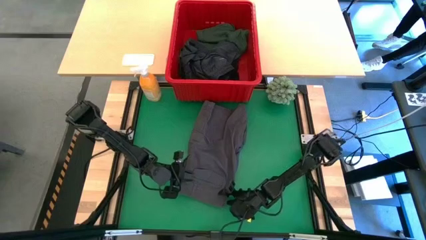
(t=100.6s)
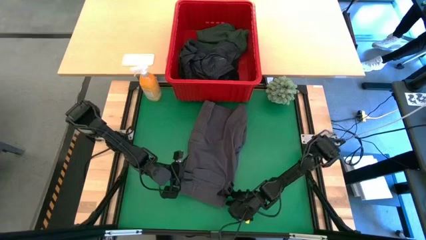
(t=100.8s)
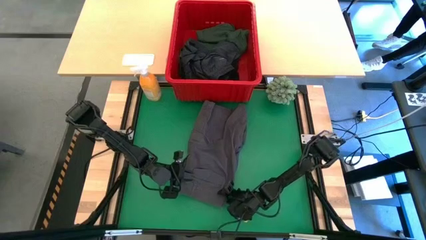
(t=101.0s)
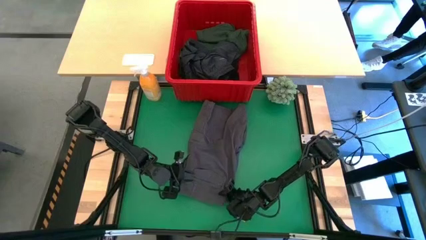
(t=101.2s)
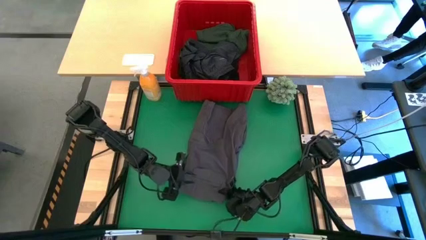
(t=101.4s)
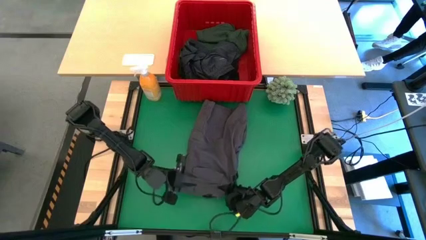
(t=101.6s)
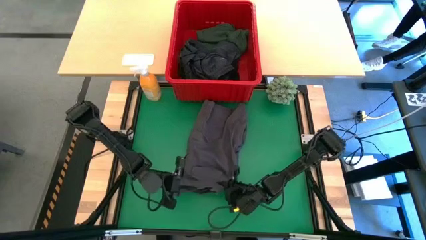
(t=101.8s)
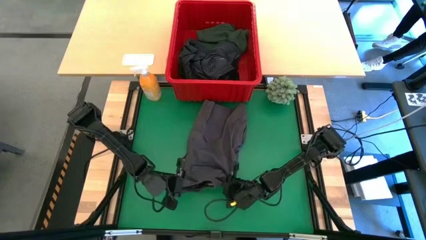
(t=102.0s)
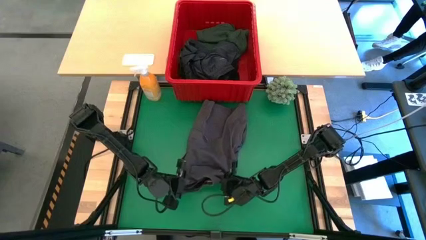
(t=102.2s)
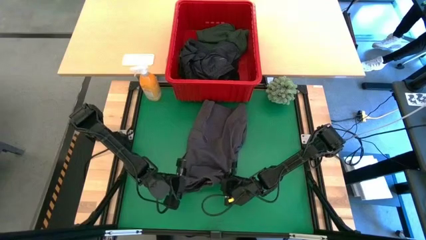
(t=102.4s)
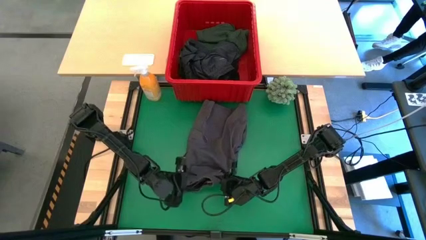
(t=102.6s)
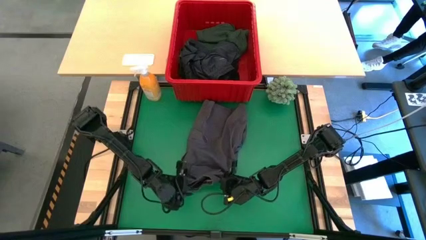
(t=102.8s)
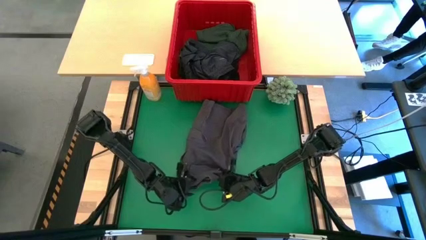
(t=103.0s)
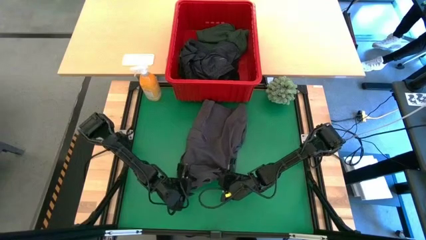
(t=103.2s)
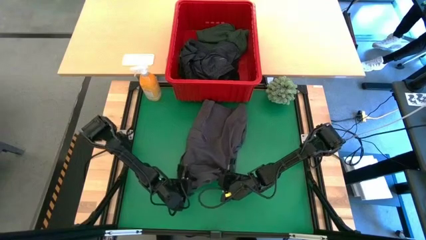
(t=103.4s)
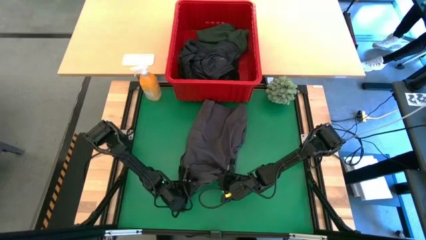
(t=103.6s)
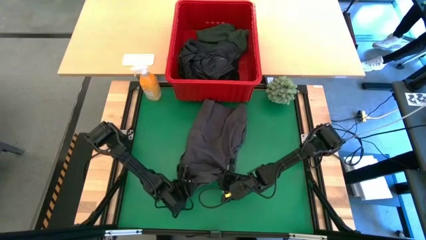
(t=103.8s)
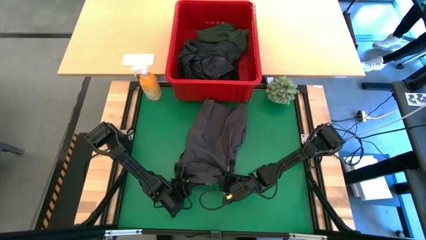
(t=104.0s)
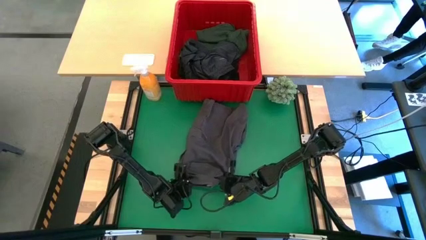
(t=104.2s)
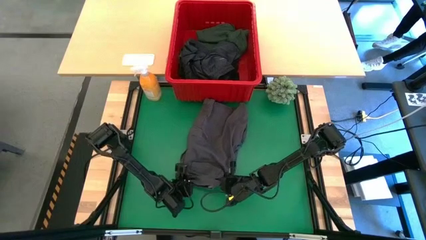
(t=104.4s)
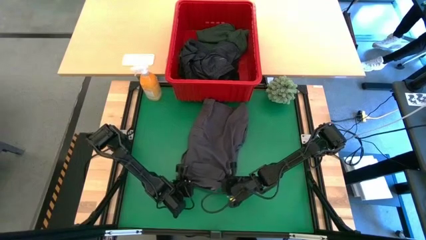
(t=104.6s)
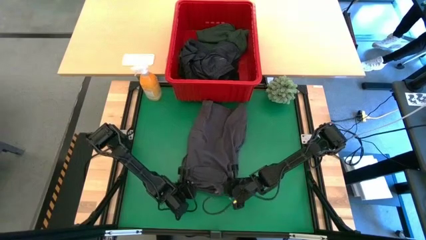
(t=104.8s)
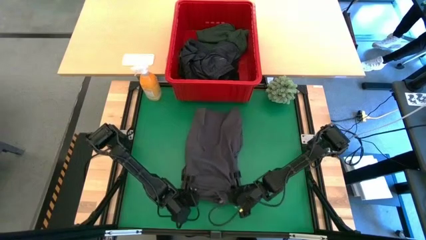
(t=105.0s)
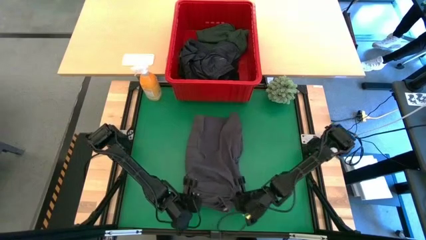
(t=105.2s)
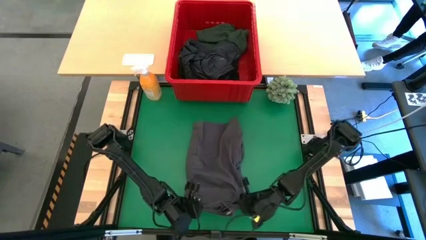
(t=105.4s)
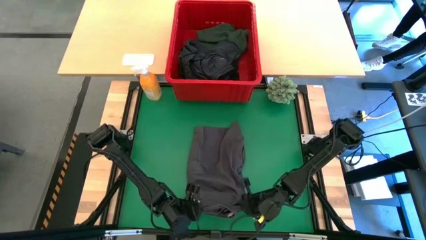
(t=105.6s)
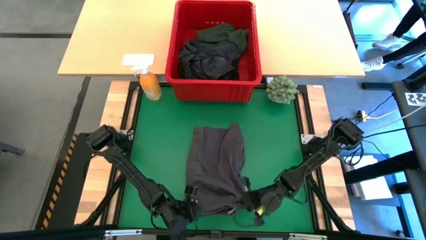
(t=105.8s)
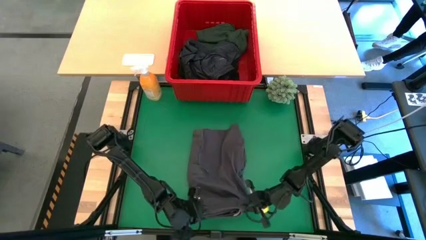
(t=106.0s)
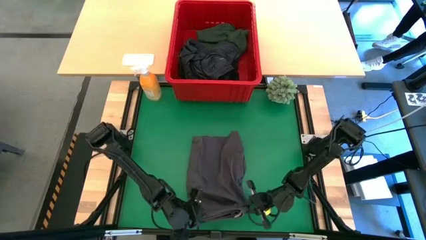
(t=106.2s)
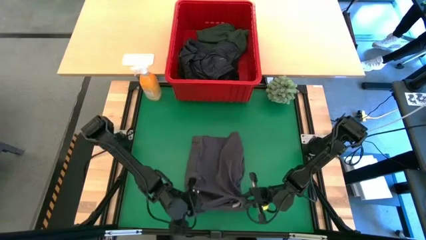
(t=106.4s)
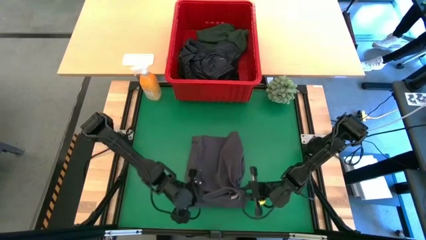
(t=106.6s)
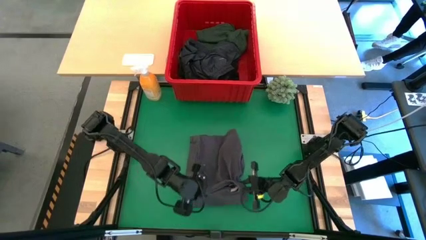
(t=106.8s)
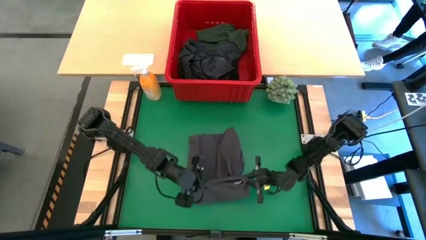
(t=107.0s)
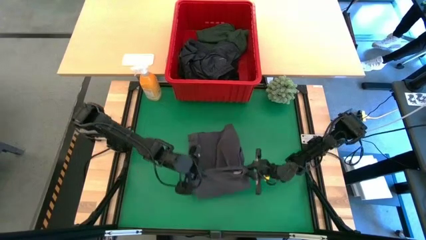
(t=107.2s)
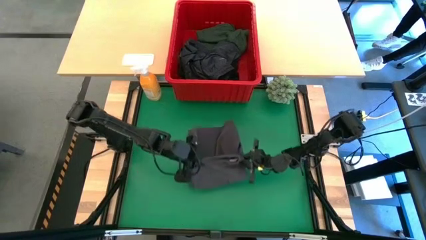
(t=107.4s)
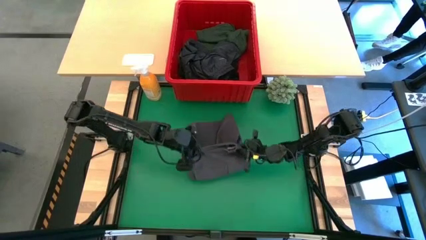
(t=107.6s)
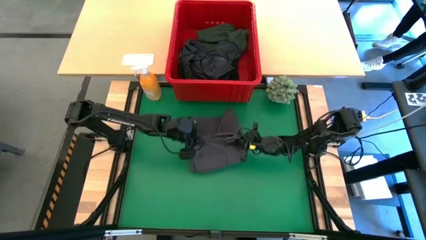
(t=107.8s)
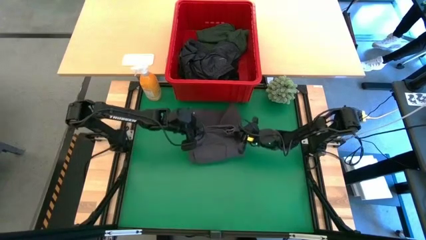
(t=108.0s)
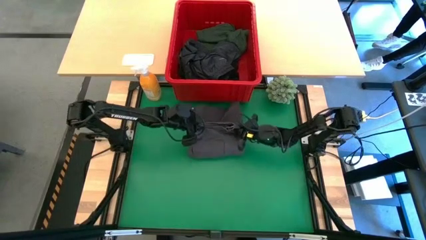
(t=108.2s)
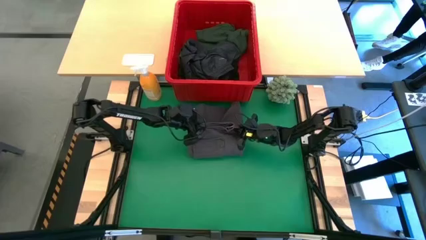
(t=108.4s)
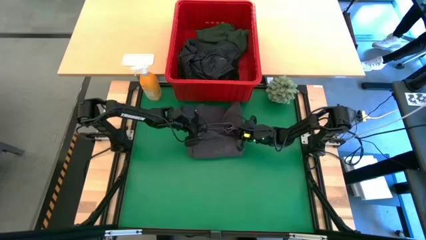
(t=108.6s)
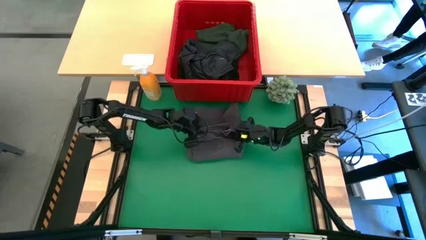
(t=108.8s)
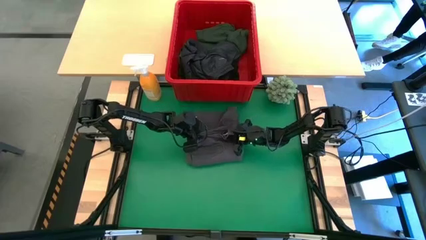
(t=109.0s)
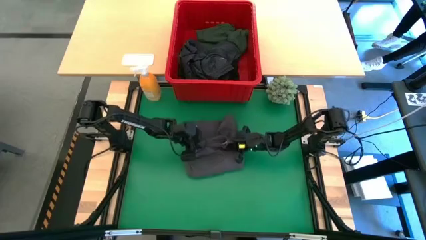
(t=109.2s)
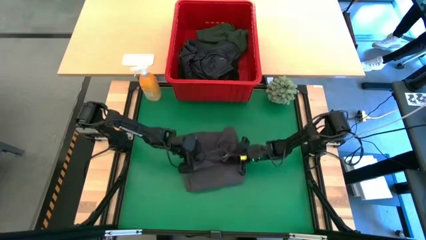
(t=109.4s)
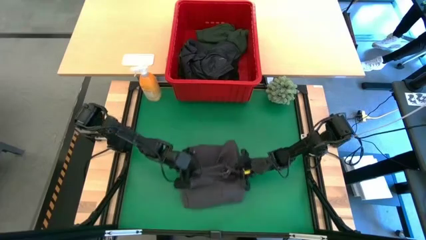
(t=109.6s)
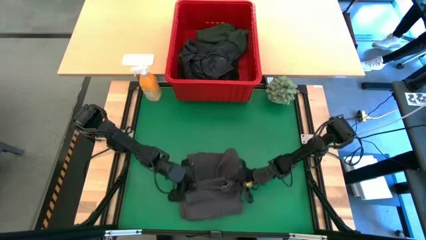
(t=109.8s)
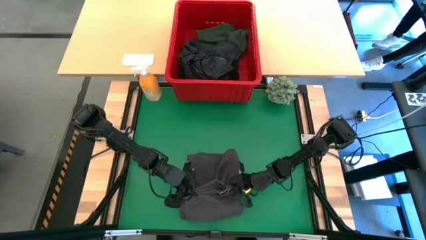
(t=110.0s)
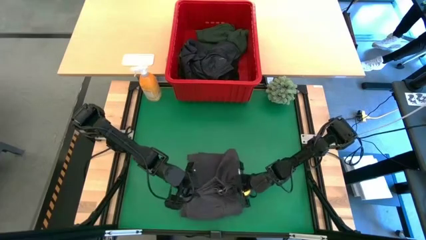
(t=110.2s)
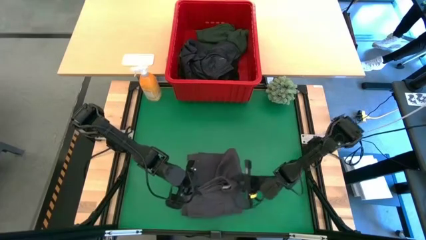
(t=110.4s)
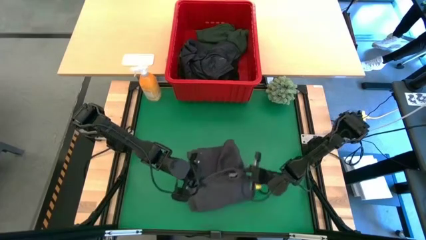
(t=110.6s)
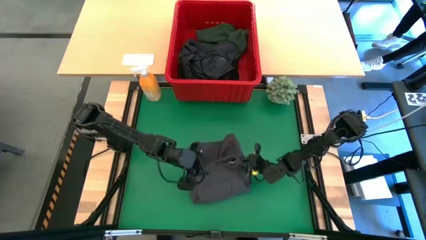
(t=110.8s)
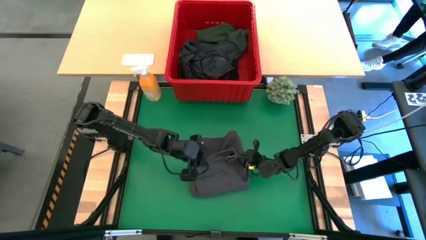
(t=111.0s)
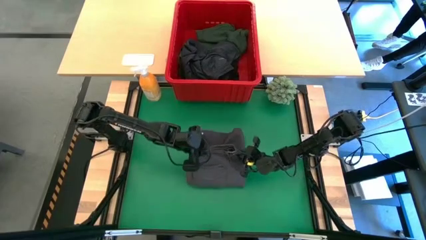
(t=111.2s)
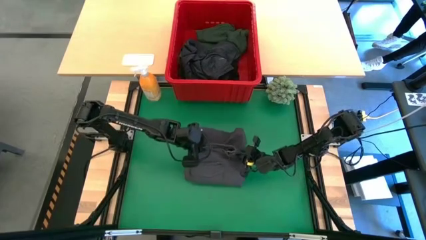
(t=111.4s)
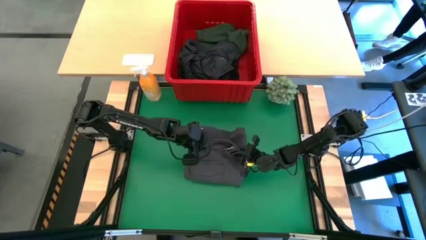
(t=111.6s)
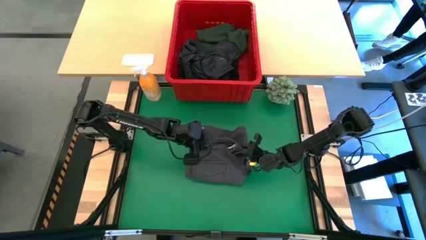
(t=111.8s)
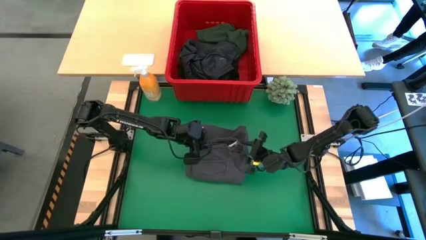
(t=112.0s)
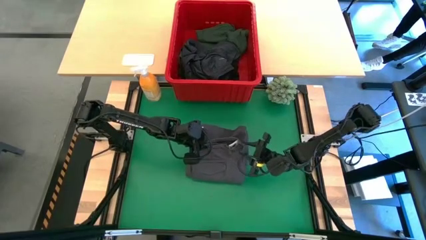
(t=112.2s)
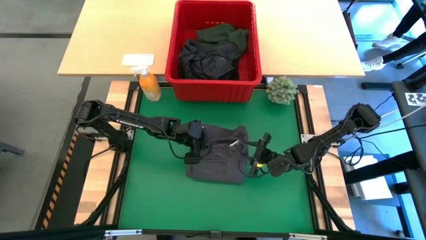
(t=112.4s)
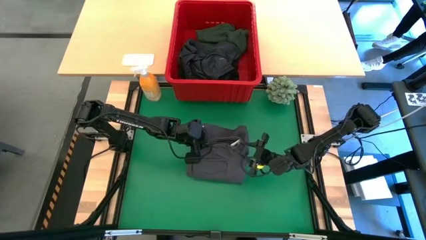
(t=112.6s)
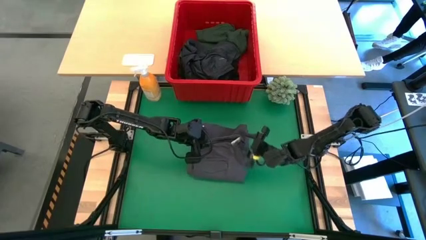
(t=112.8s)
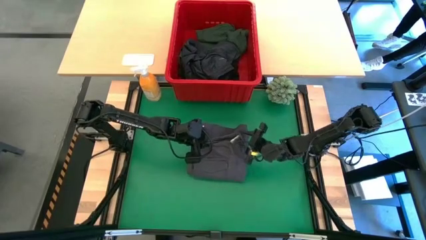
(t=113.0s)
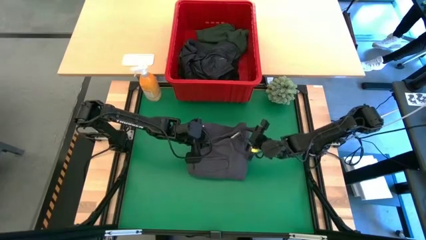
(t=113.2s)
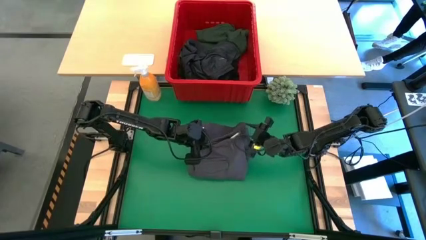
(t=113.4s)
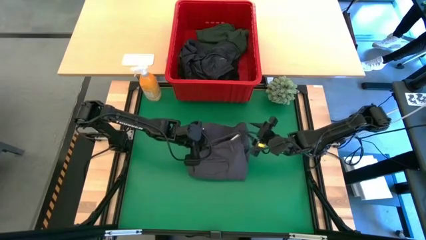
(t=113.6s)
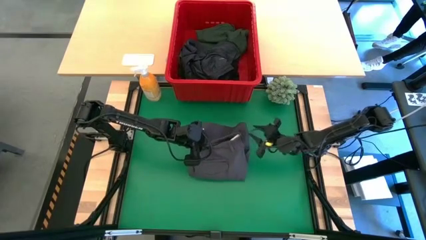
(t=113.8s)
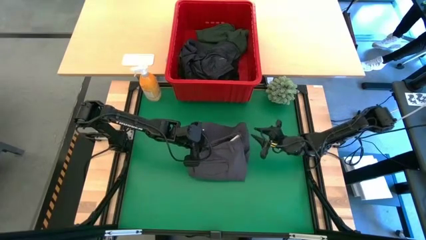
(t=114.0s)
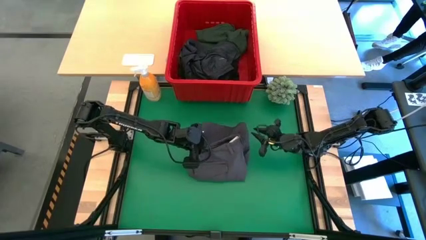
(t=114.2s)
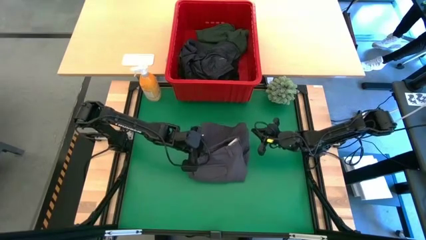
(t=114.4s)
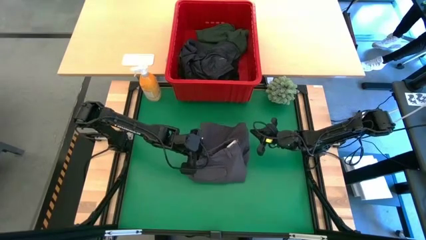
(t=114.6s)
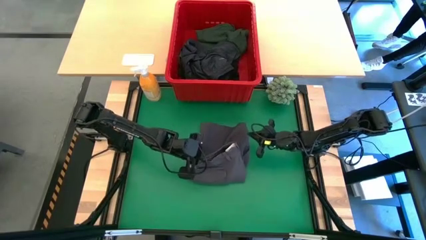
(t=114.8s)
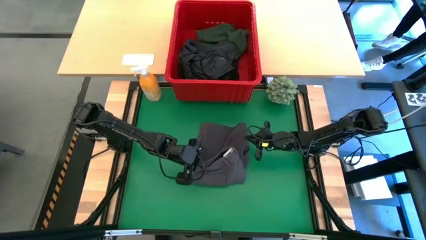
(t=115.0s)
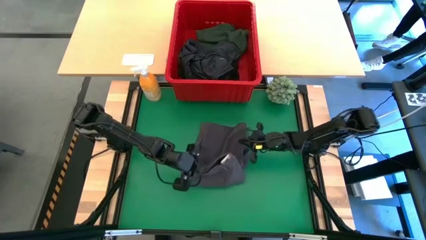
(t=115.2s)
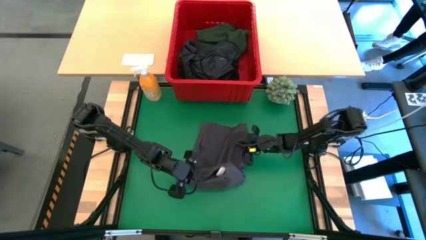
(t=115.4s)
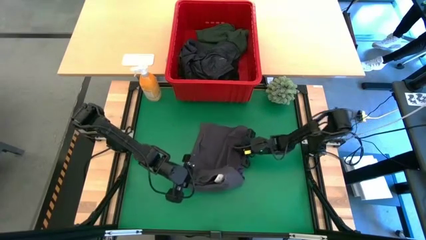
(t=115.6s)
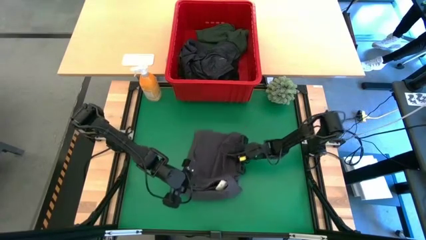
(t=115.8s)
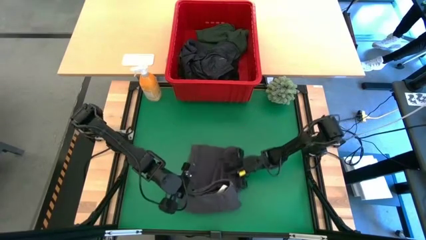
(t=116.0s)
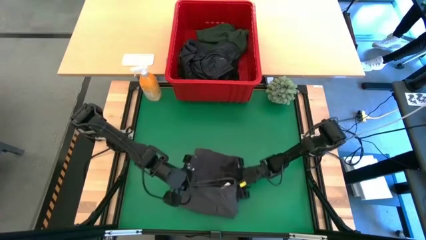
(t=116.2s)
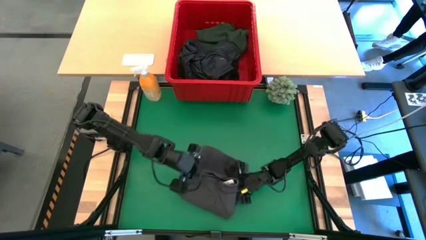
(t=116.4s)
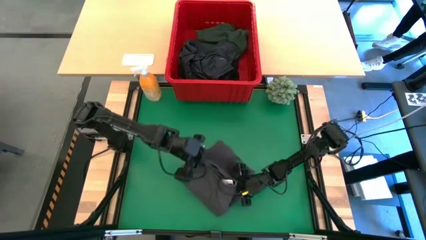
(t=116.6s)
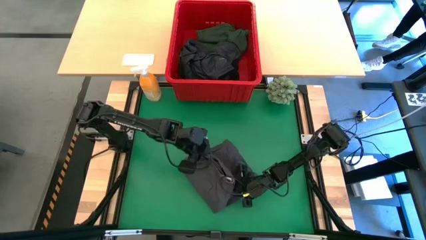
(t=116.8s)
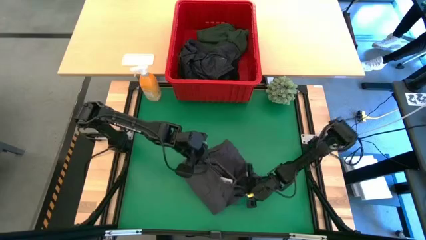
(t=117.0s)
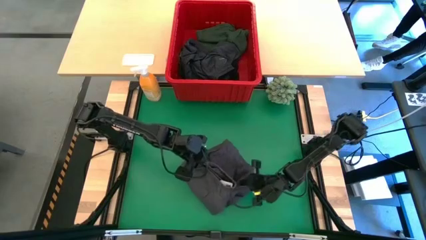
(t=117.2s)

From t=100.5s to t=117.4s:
Task: Fold Laundry from Bin
Fold the gray short
